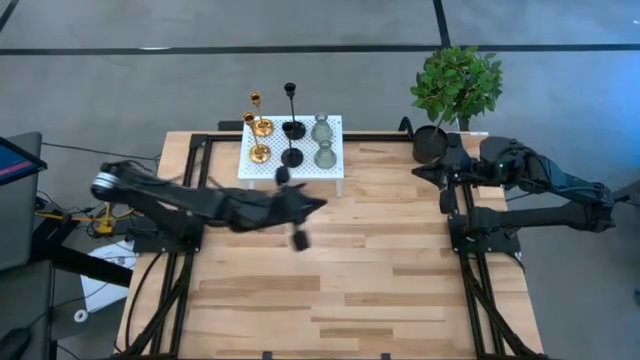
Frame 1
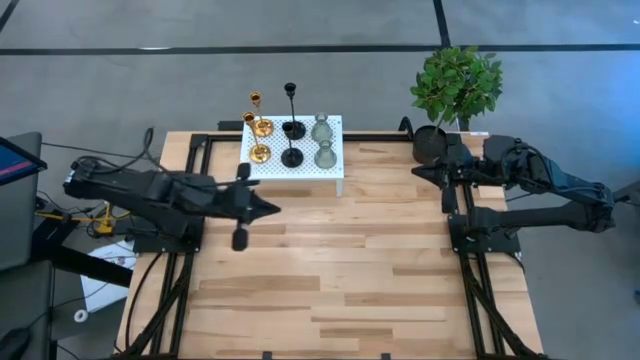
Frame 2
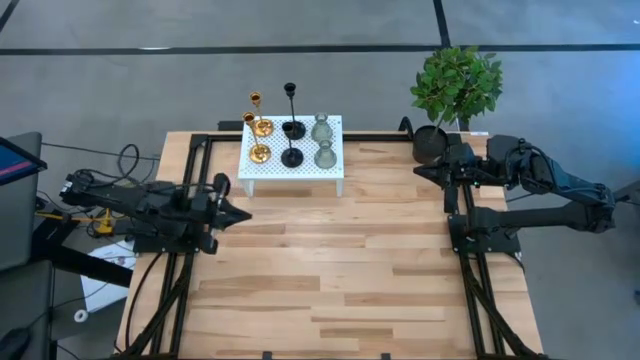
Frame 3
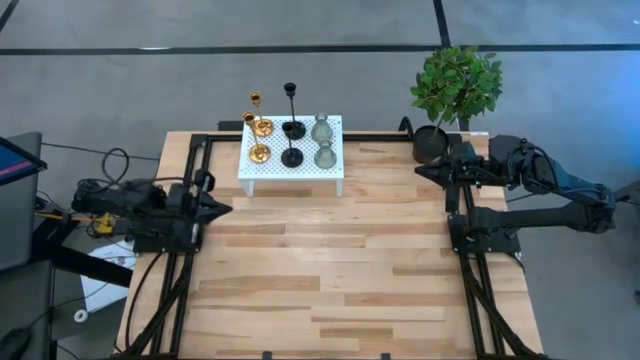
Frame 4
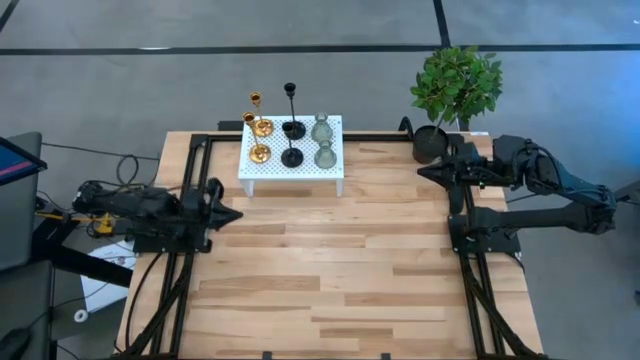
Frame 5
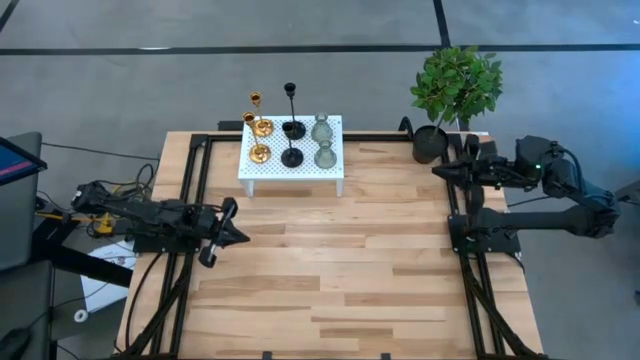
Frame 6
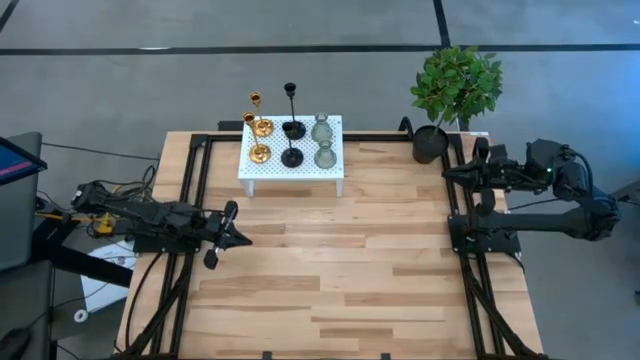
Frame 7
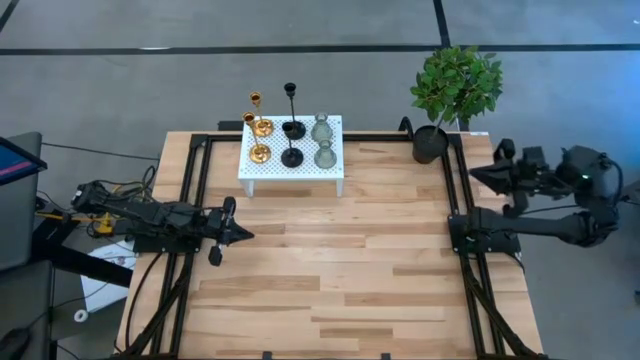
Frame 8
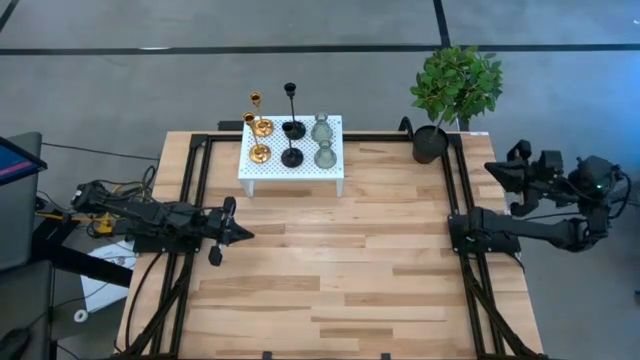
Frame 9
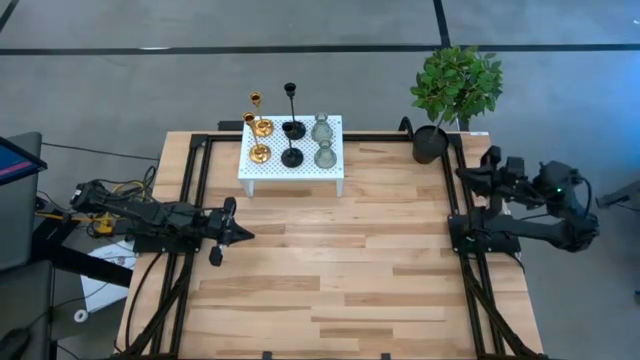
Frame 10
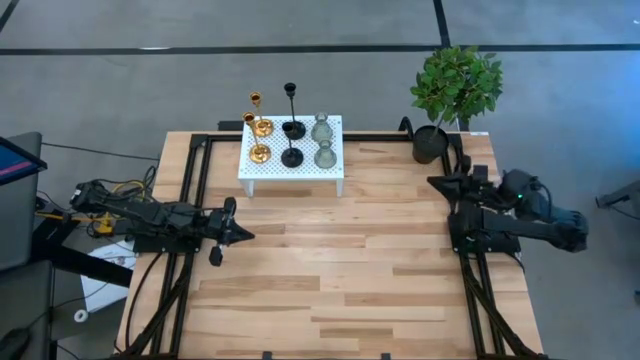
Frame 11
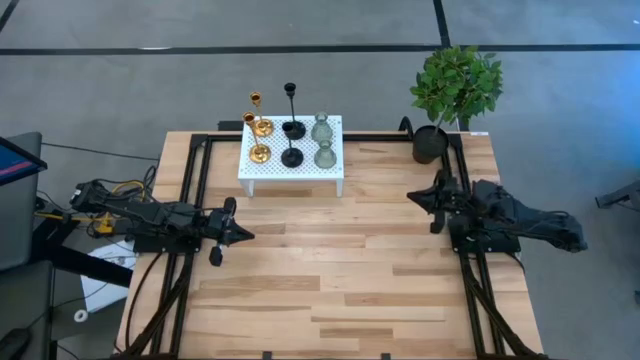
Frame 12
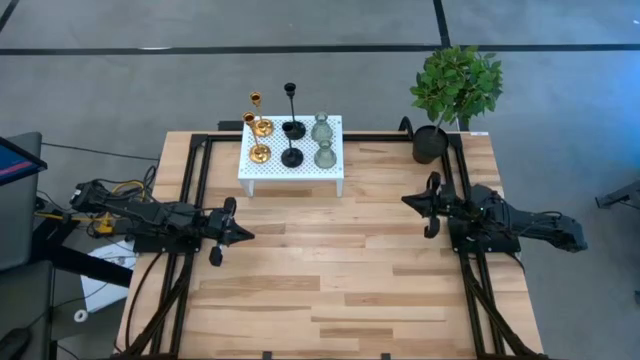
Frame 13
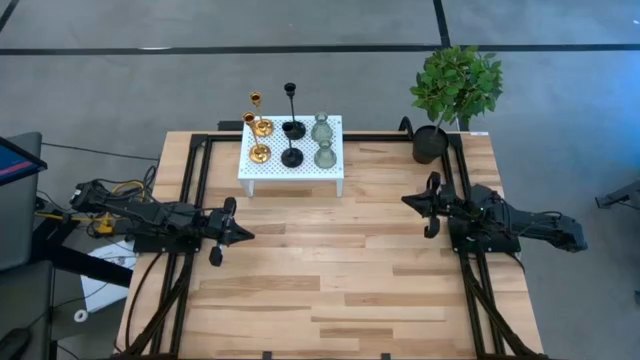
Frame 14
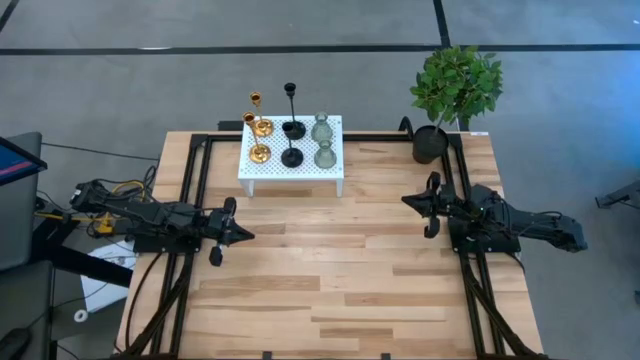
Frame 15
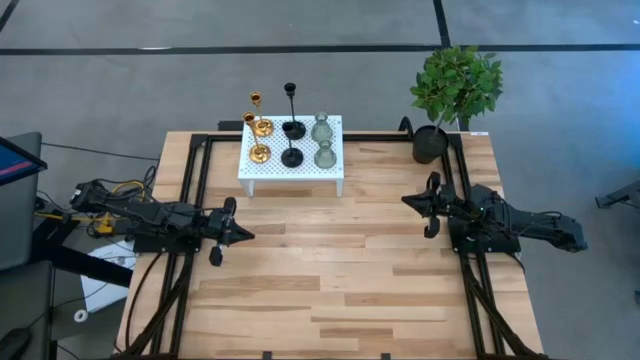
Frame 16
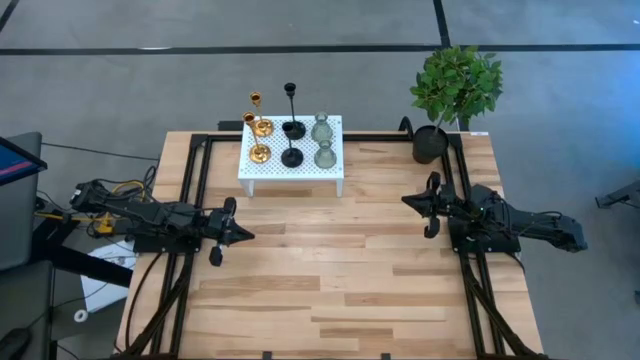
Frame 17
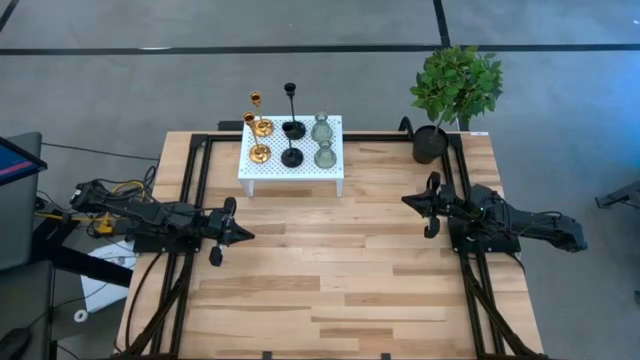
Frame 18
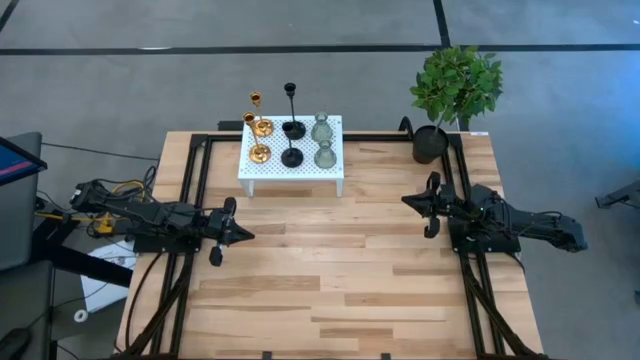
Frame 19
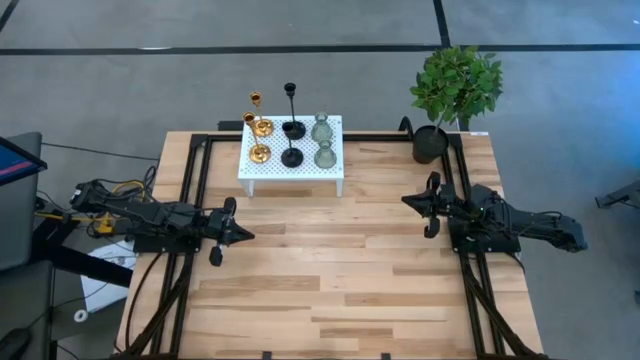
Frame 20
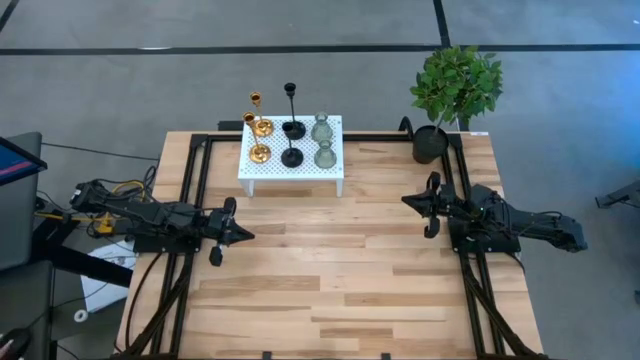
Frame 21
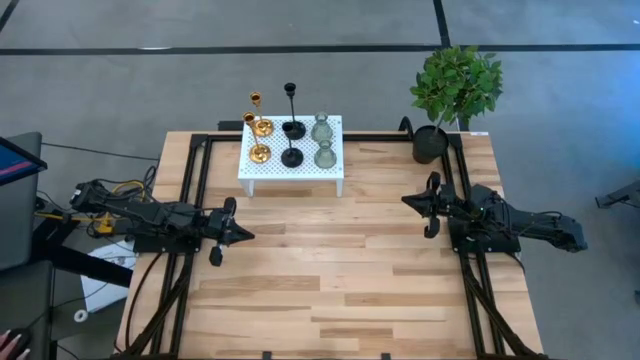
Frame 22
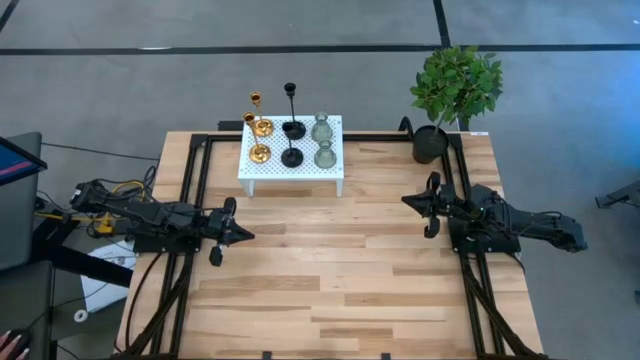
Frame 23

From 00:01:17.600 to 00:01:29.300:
Task: Pick & Place candle stick holders
Return to Home Position

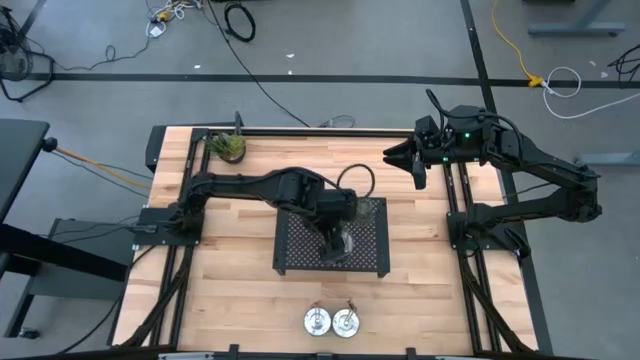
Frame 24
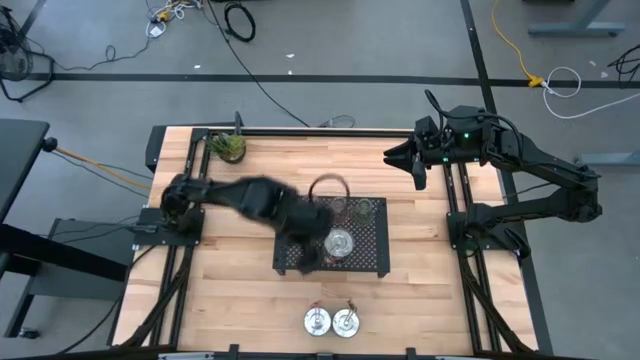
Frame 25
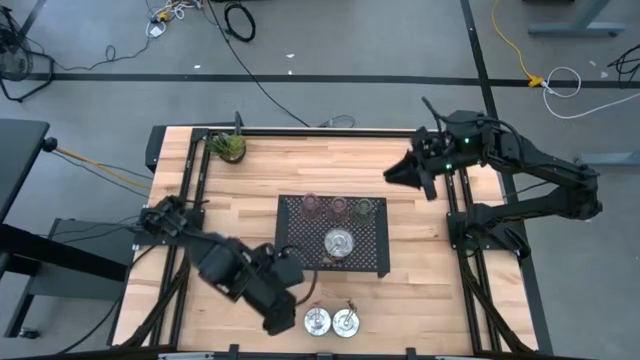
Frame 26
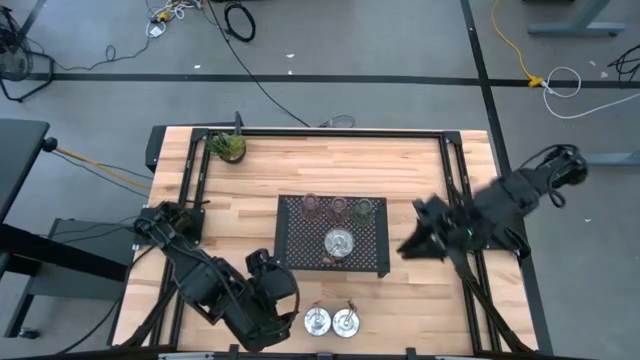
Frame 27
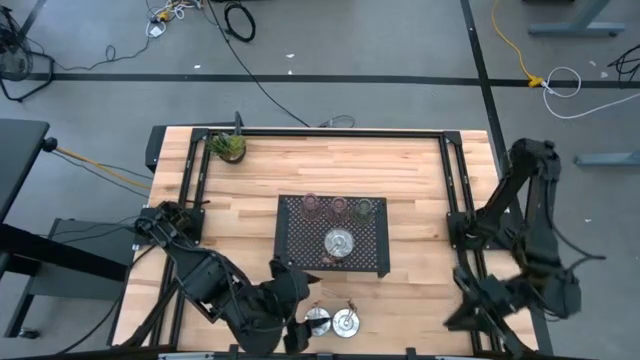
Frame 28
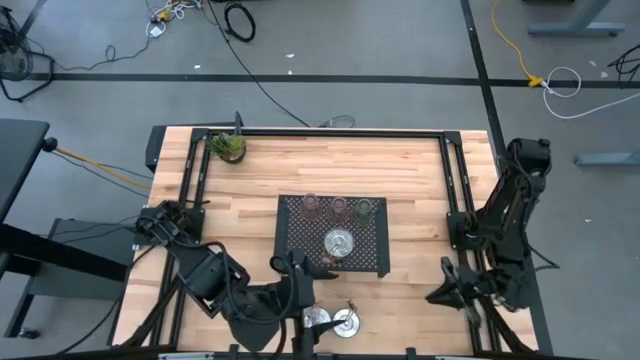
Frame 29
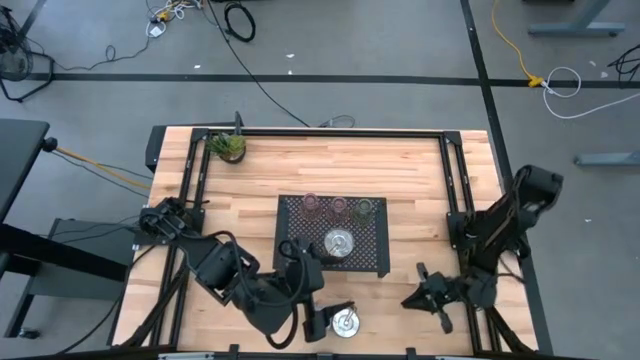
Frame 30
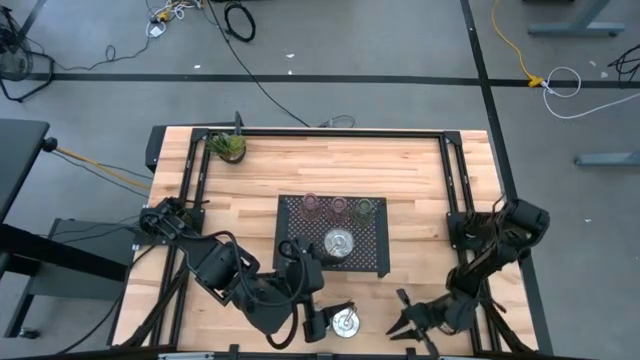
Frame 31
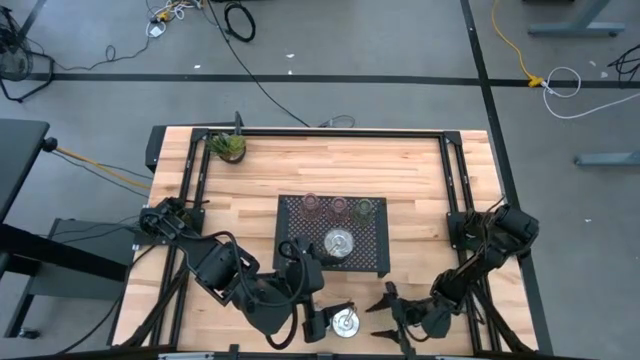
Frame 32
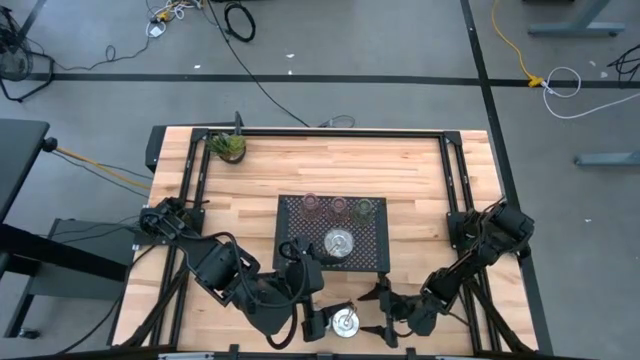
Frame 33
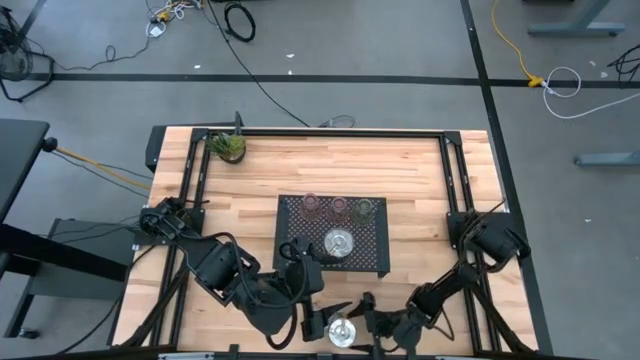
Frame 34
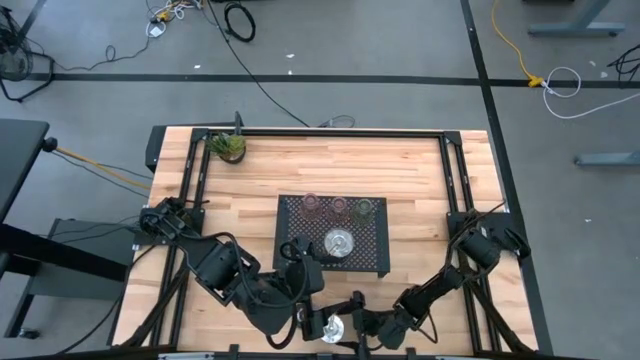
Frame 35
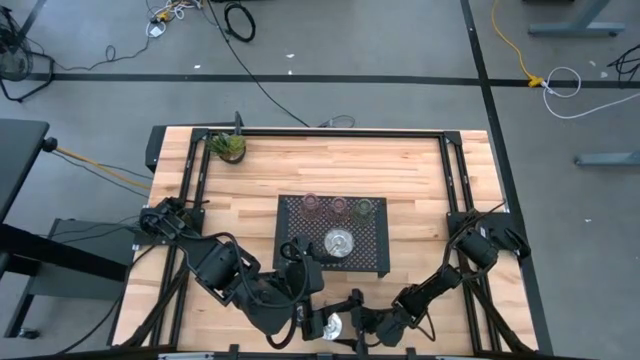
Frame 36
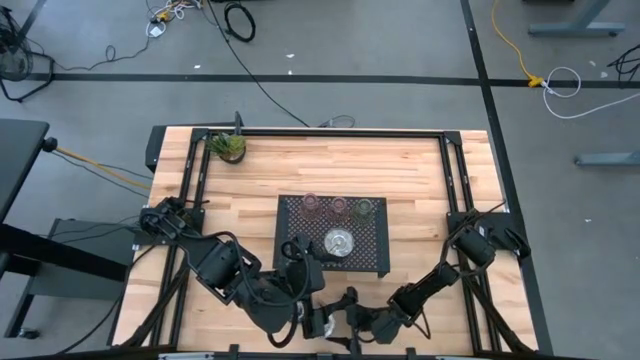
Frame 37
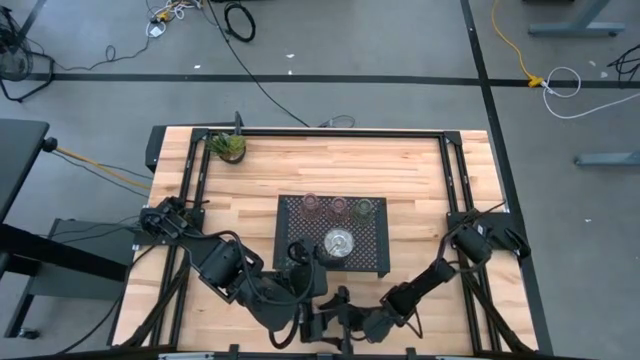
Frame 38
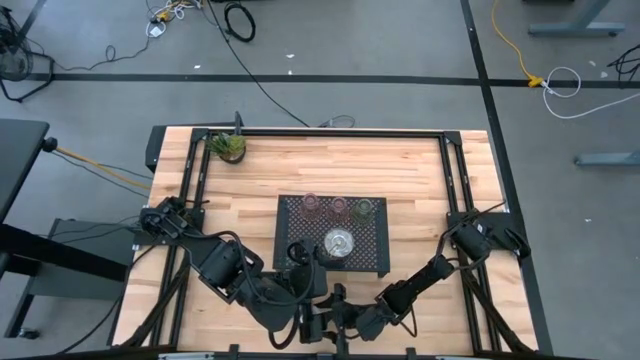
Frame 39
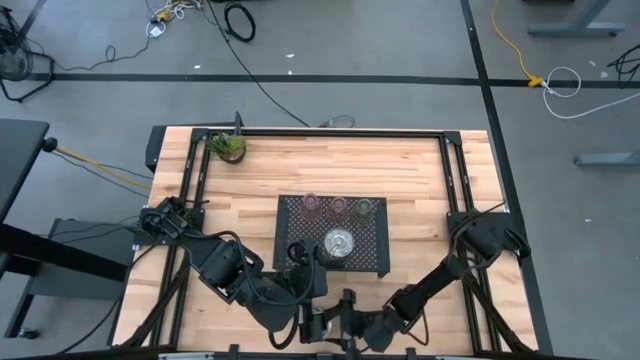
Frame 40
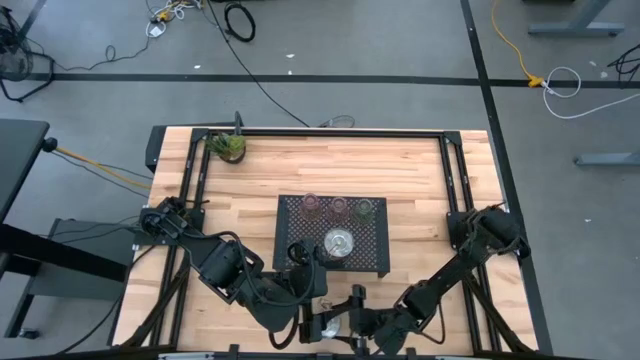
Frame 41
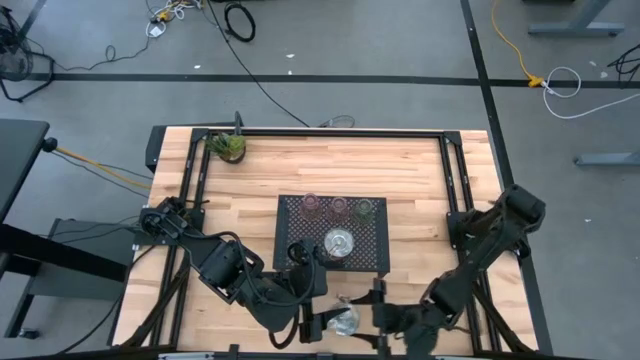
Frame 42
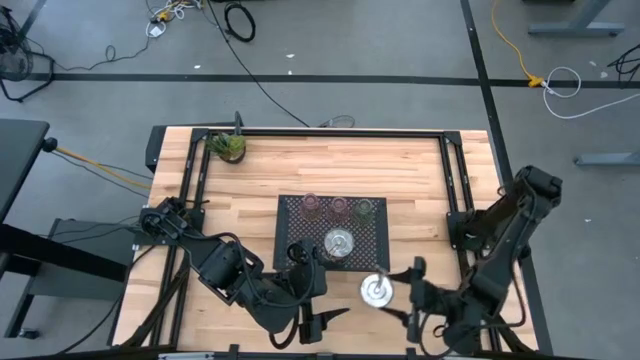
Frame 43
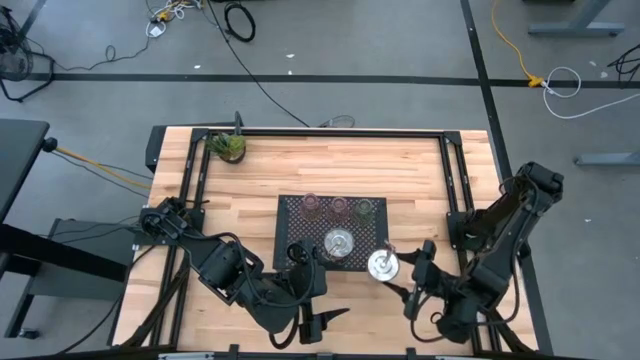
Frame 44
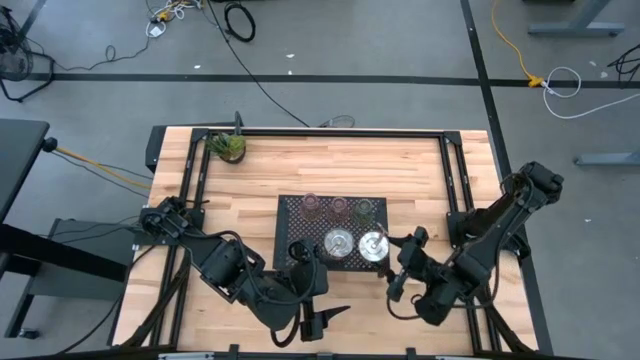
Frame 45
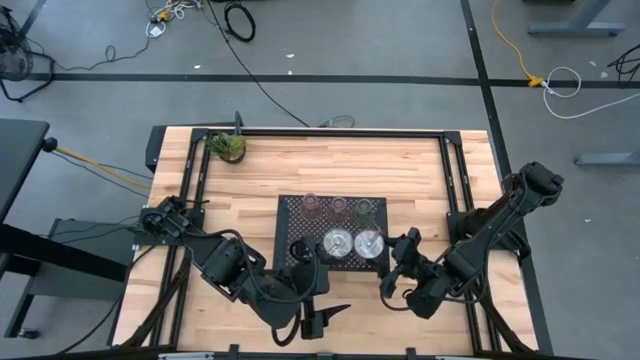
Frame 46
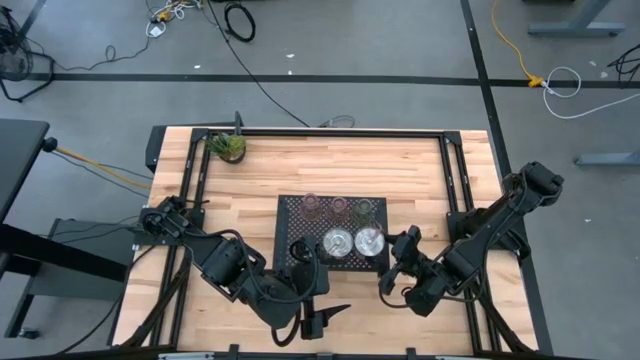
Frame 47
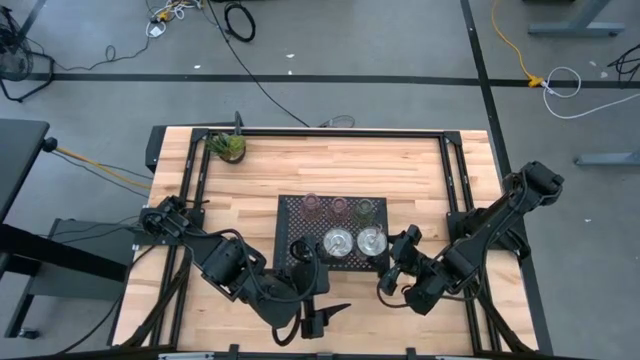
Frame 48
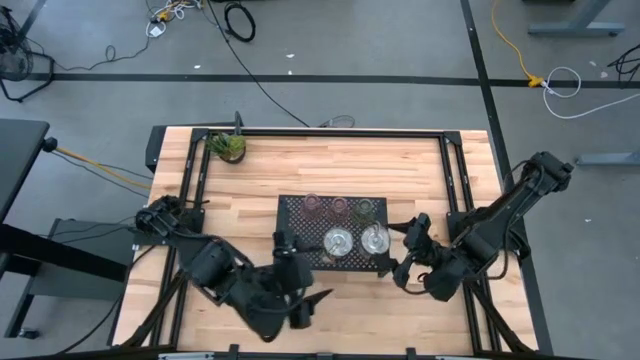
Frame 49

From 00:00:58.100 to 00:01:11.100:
Task: Pick & Place candle stick holders
Put the right silver scented candle on the shelf
